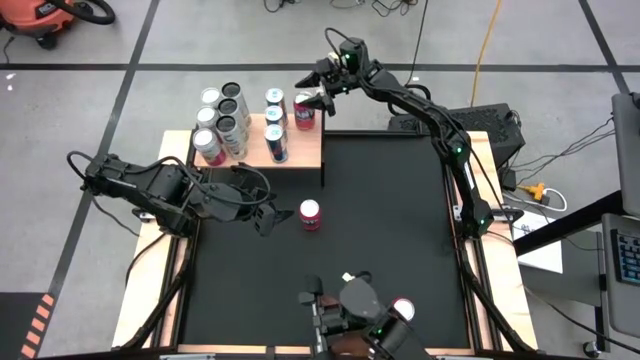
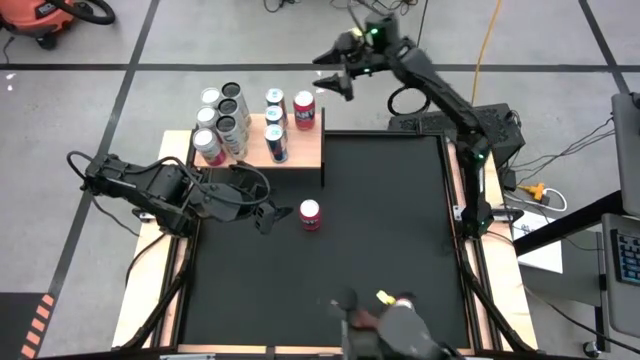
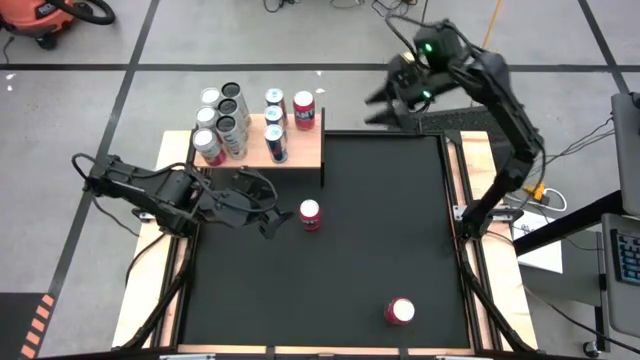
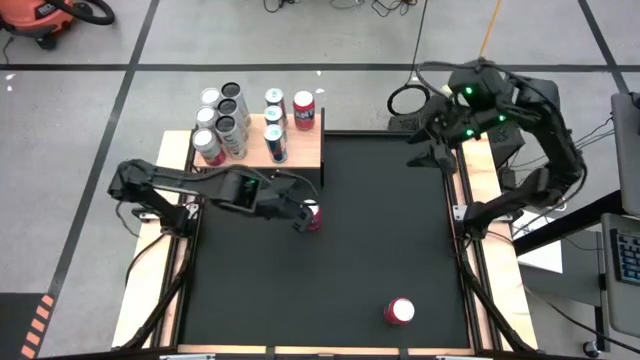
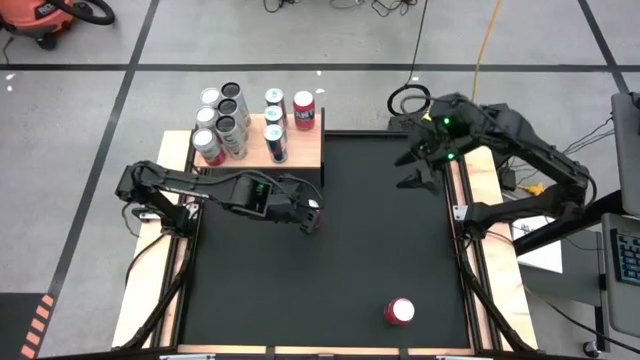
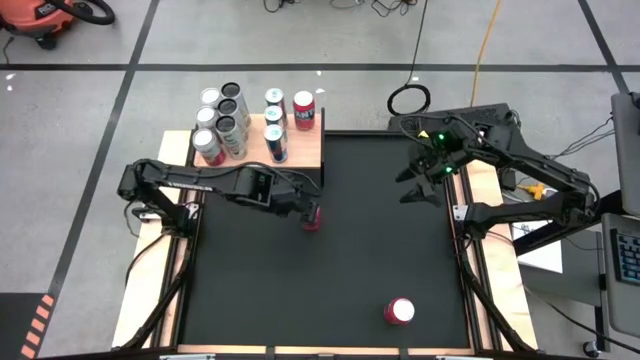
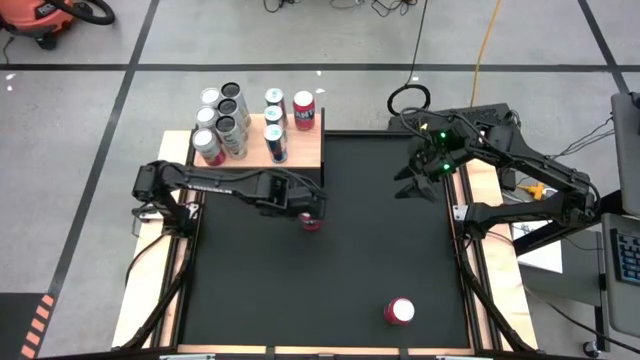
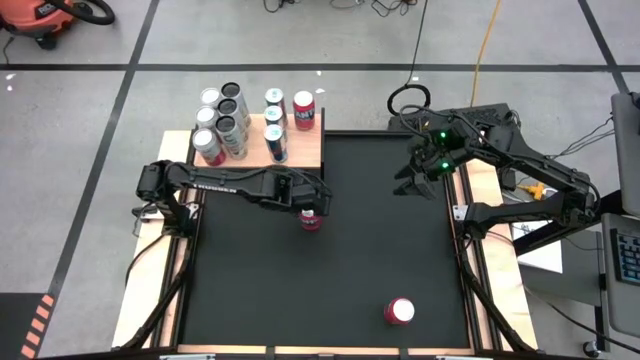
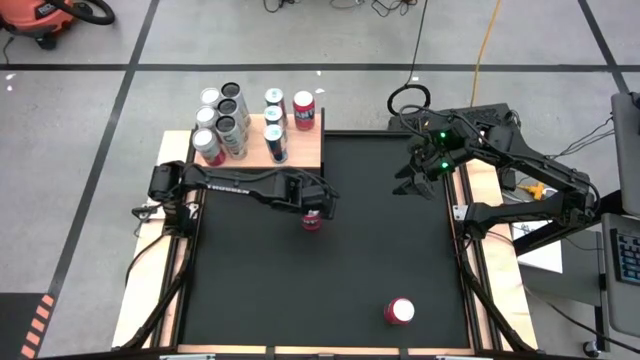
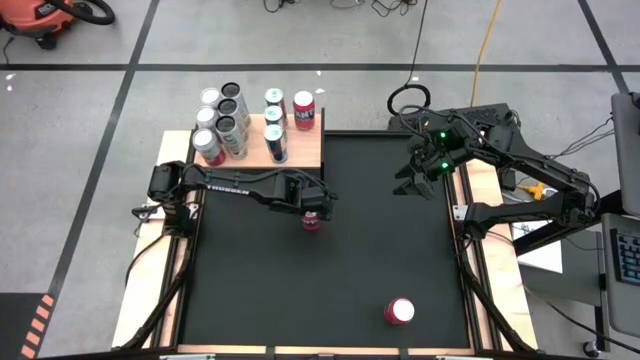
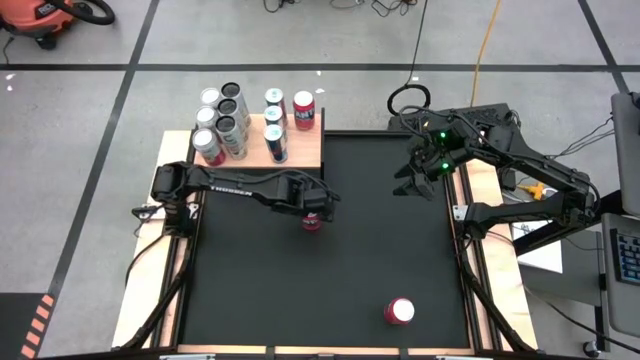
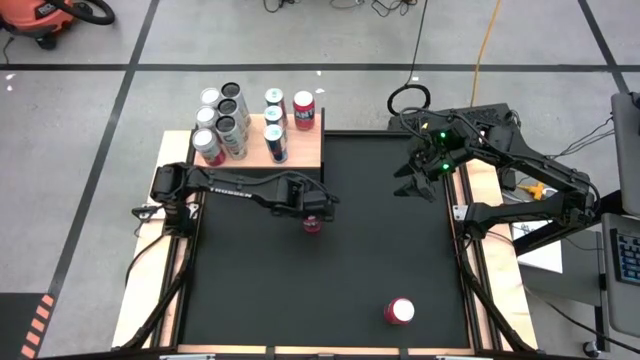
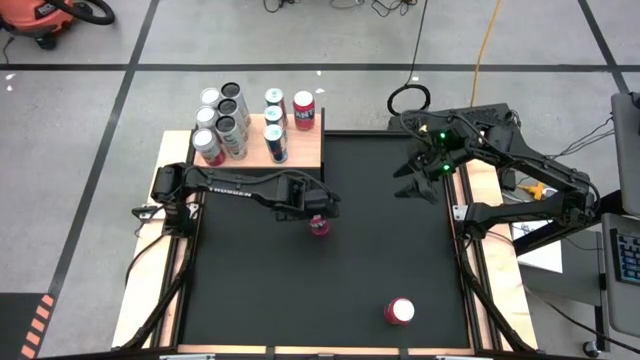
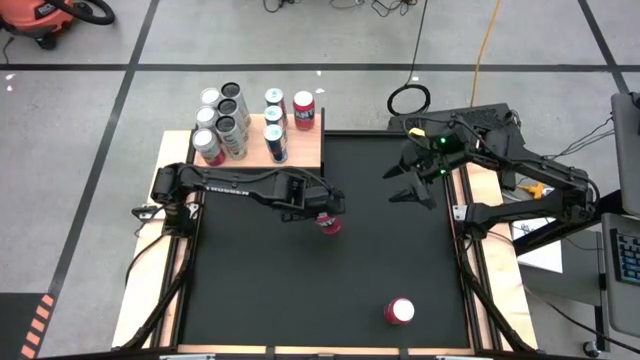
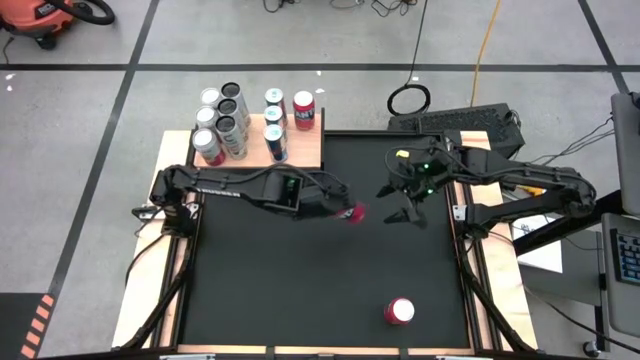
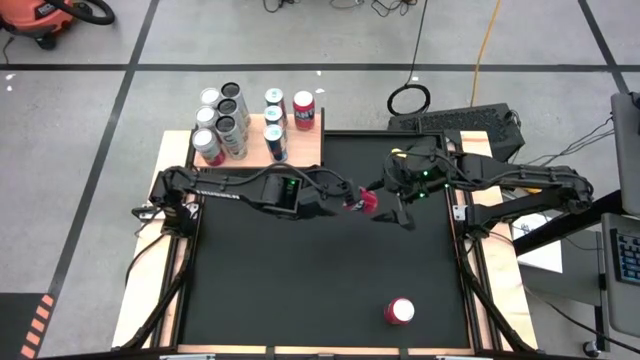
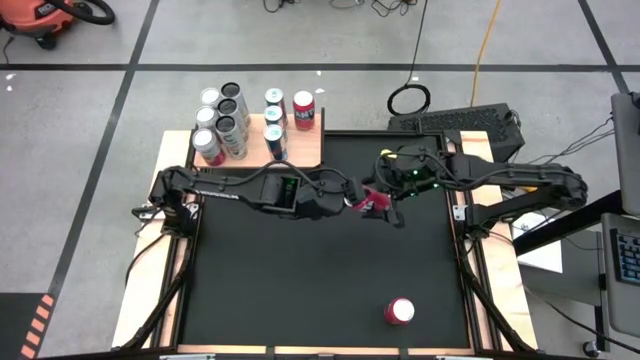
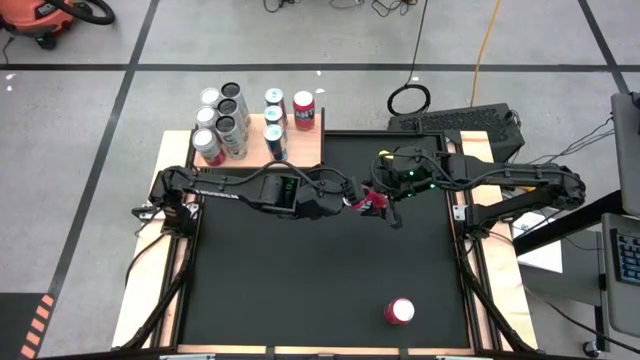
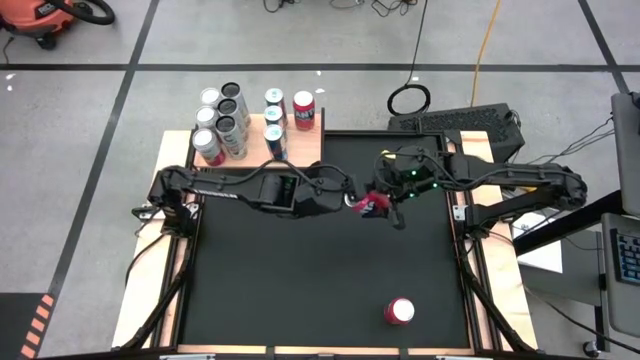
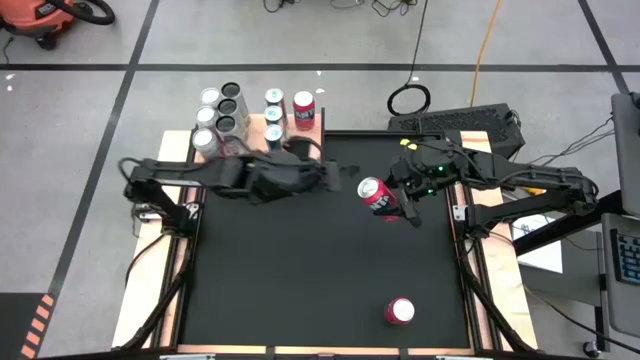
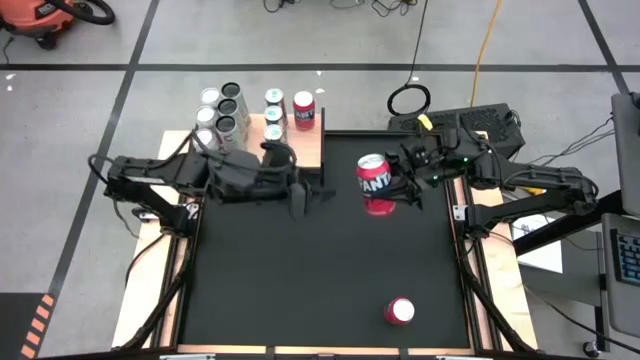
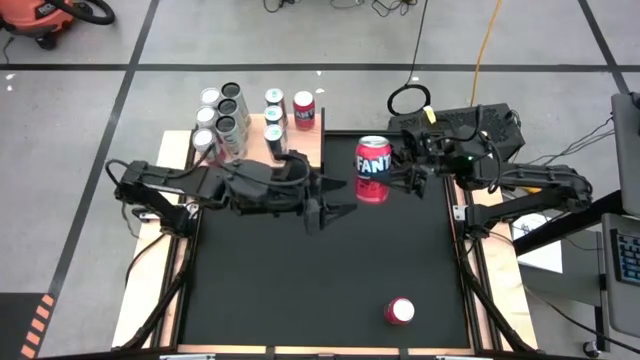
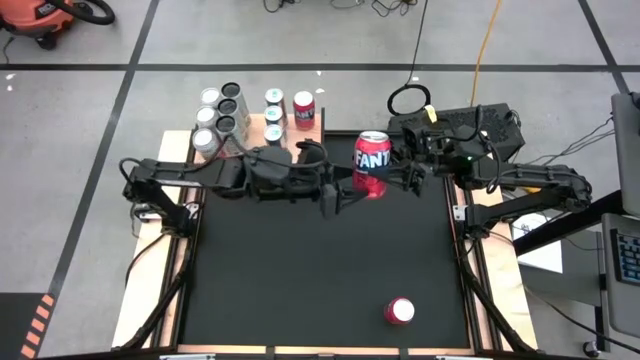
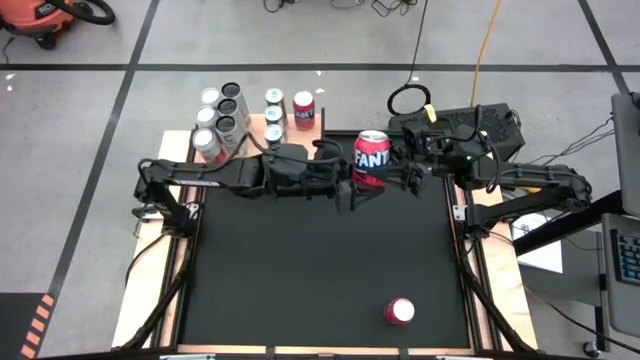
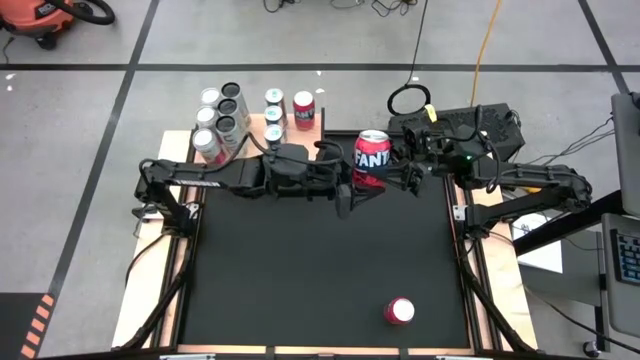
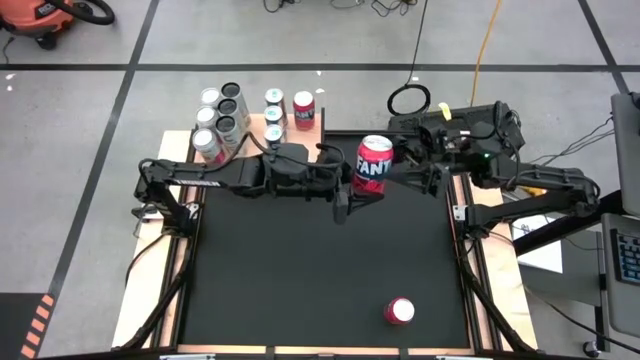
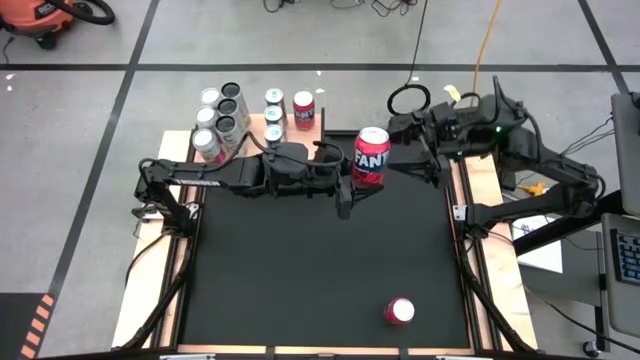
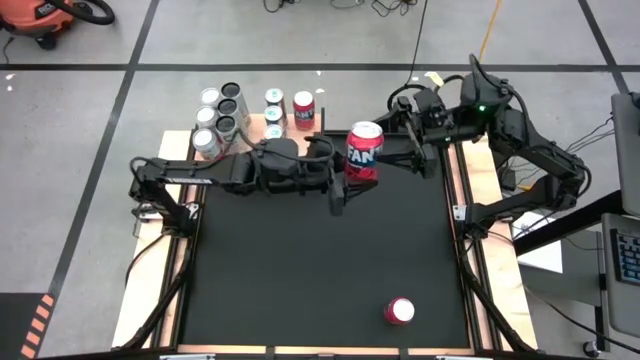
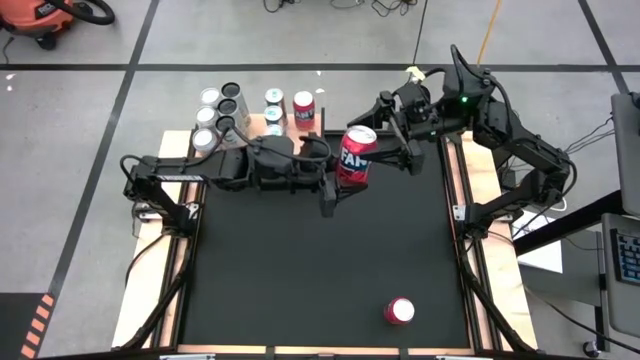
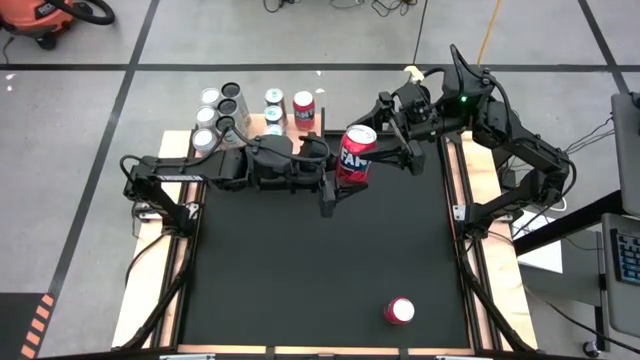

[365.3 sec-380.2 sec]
Task: Place canned beverage on shelf
Put the top red soda can on the shelf aligned with the other red soda can

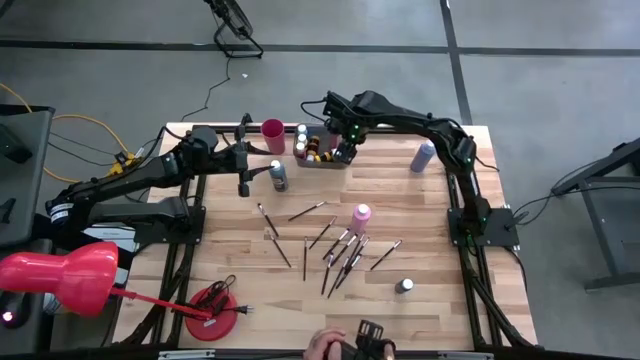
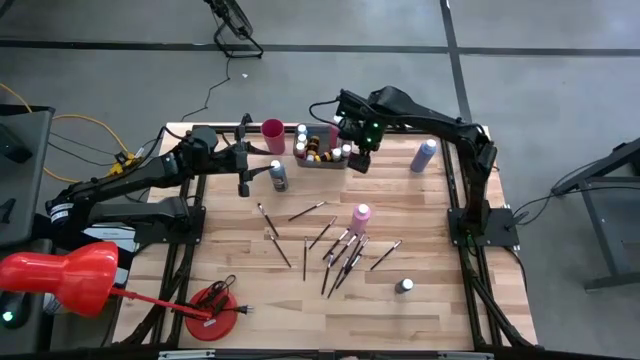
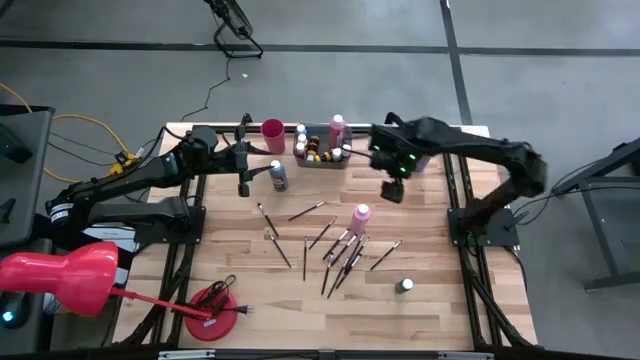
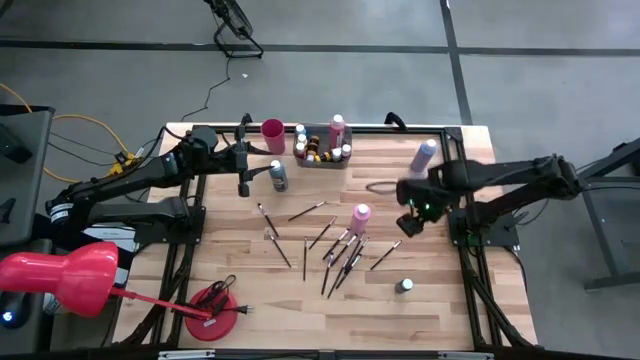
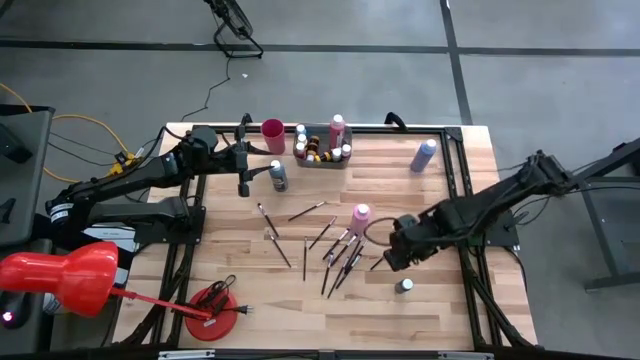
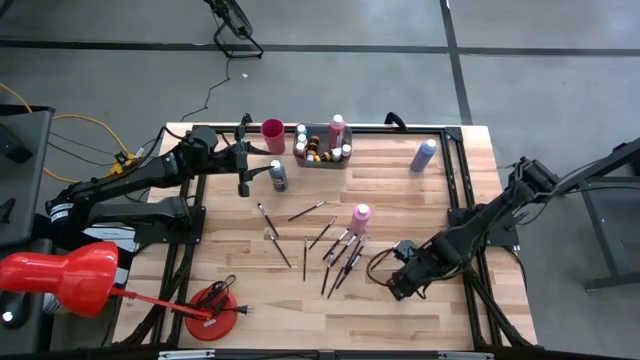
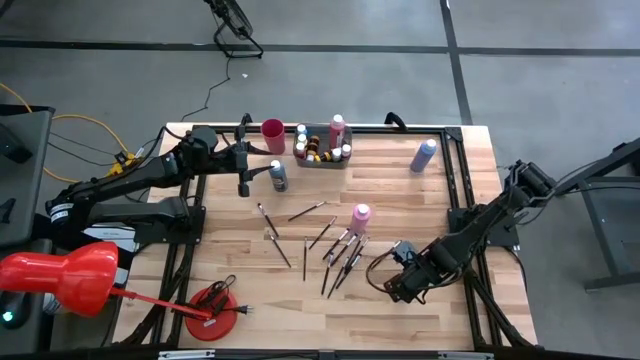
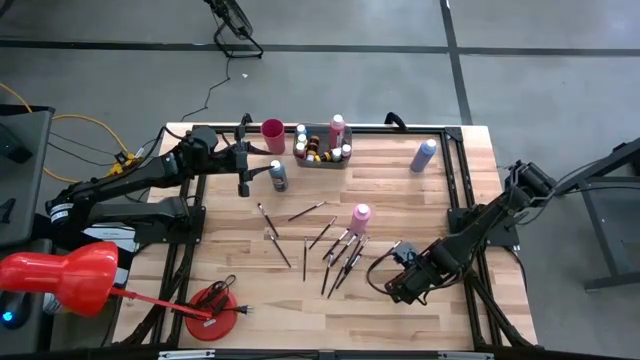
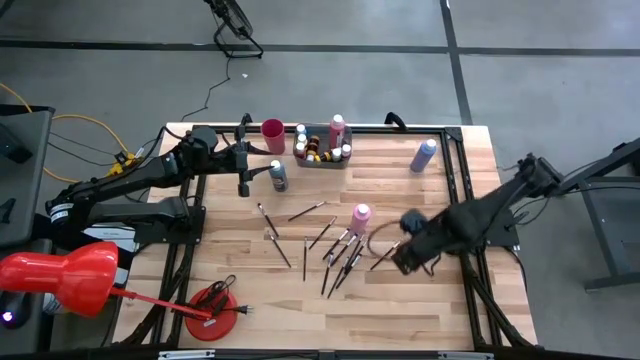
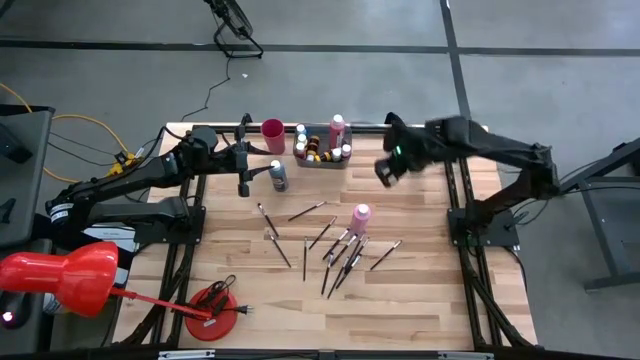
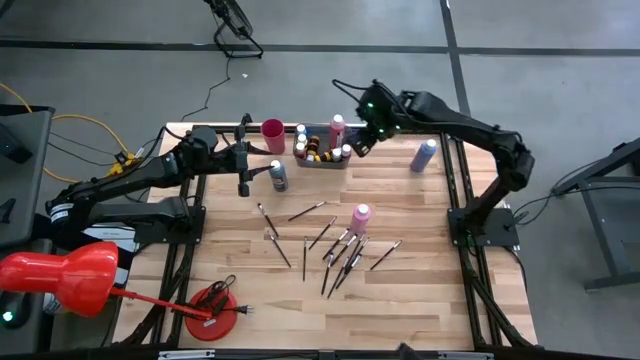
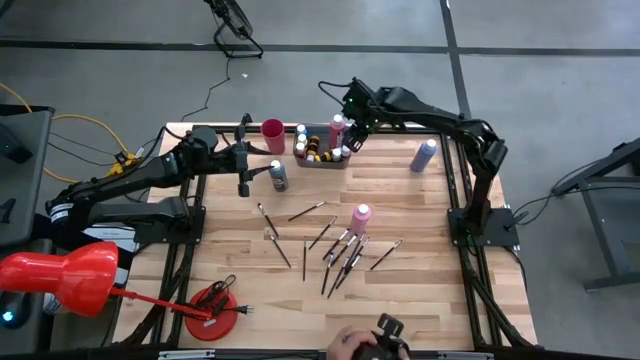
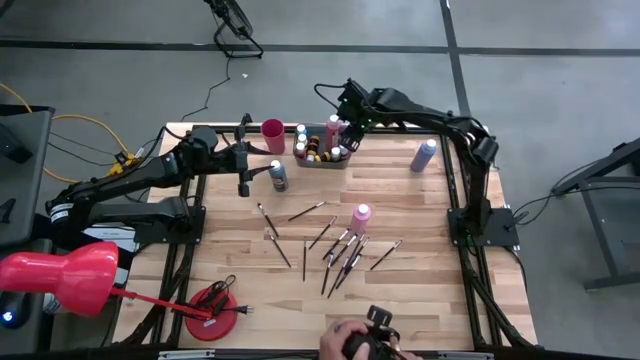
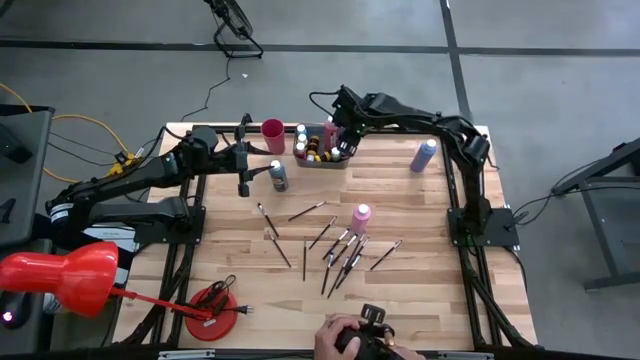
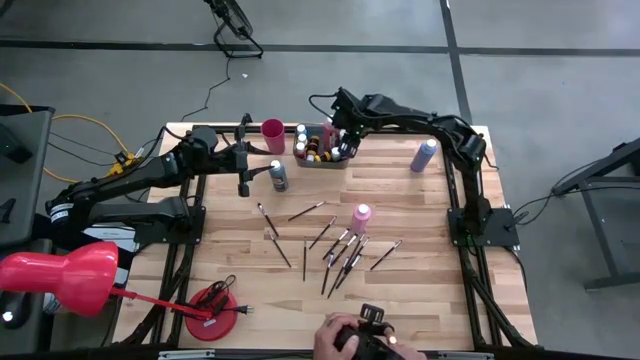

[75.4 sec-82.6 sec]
Task: Pick & Place Paint Supplies
Put the small dark blue paint bottle into the black bin

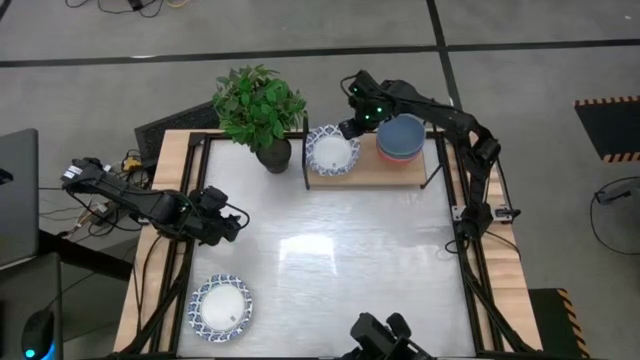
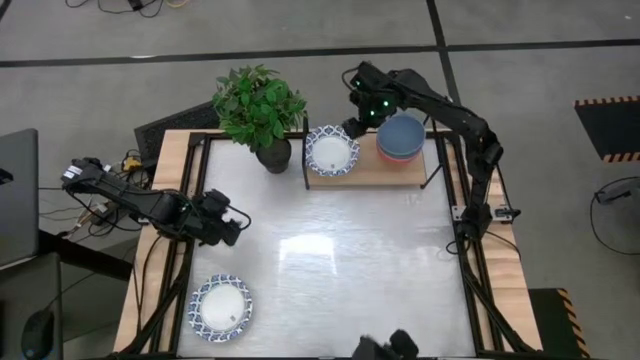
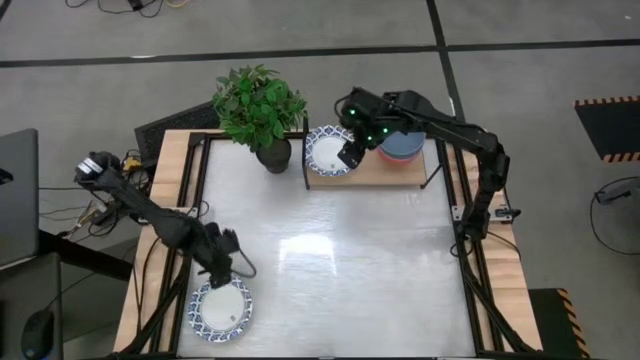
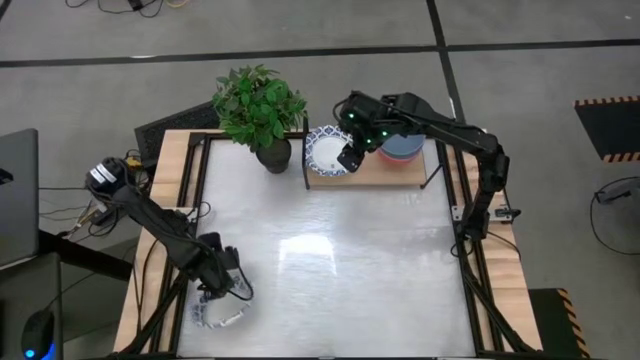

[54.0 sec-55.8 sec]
Task: Place and stack bowls onto a shelf
Stack the white bowl on top of white bowl on the shelf
